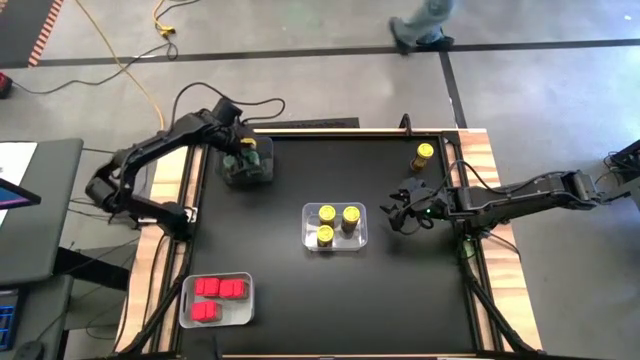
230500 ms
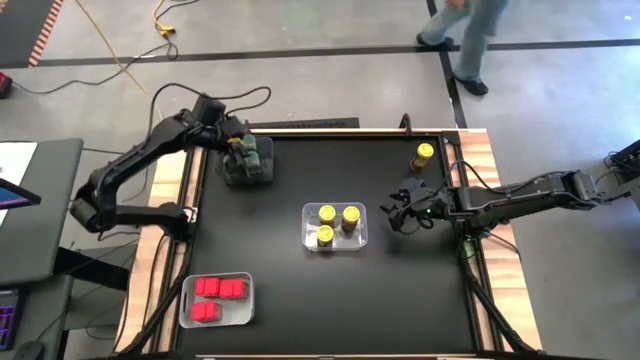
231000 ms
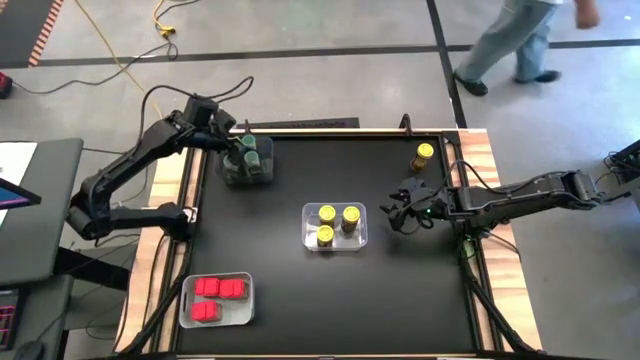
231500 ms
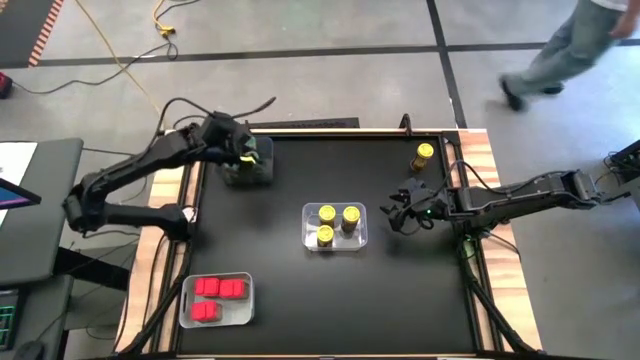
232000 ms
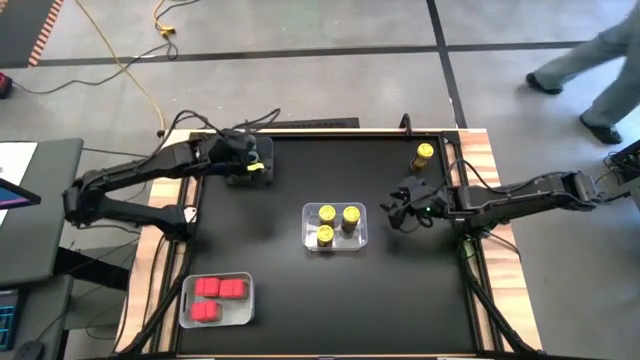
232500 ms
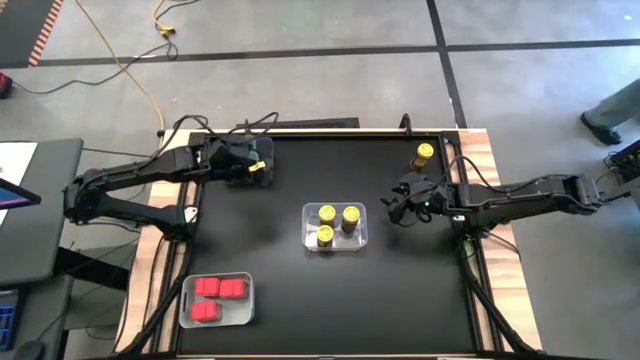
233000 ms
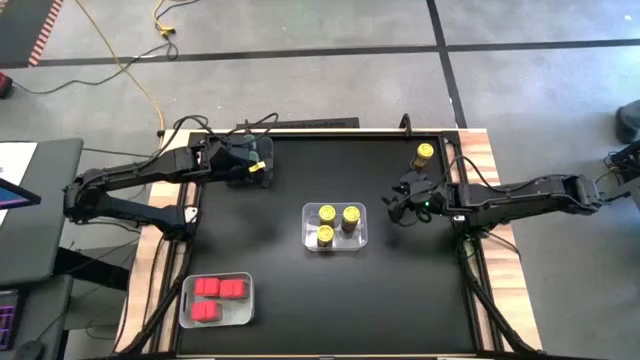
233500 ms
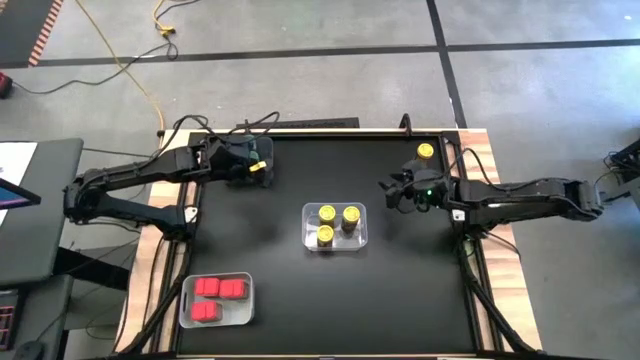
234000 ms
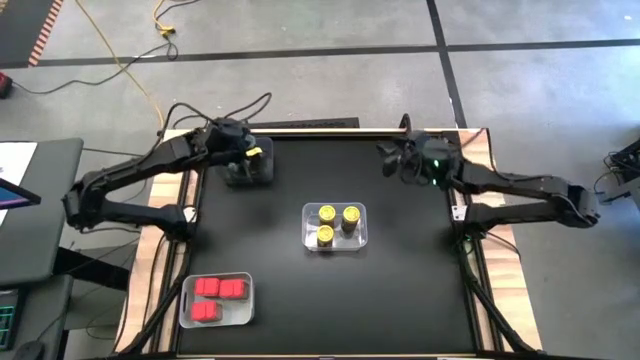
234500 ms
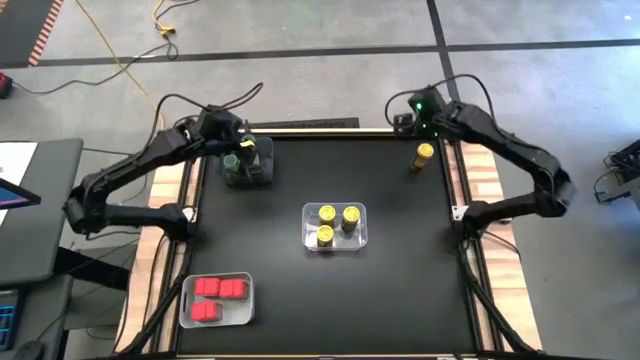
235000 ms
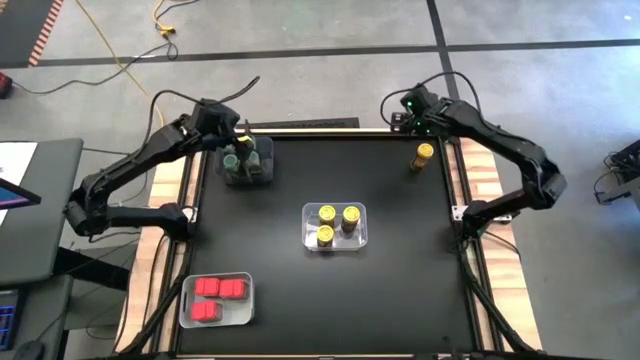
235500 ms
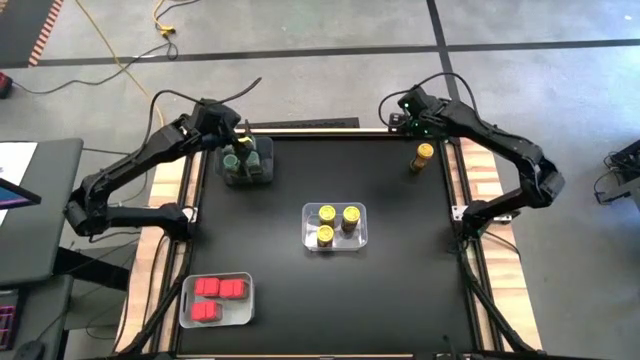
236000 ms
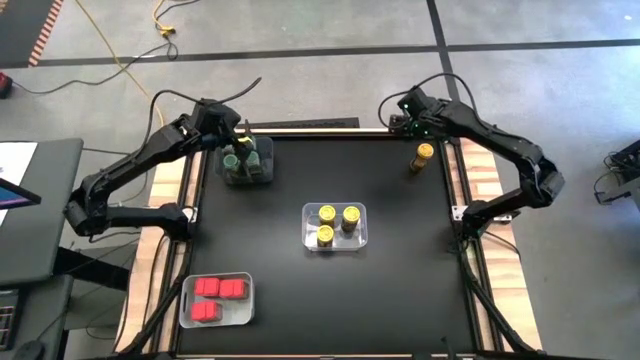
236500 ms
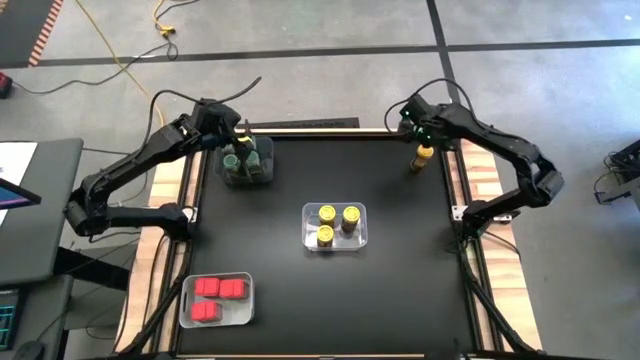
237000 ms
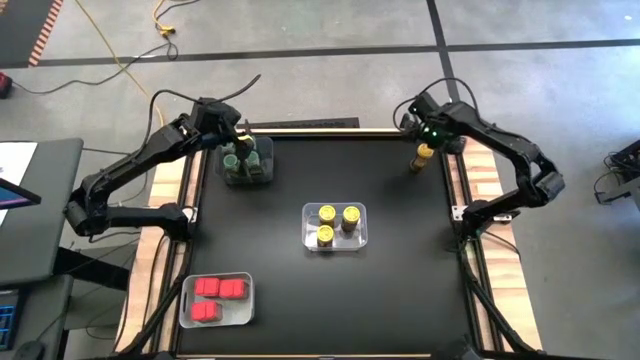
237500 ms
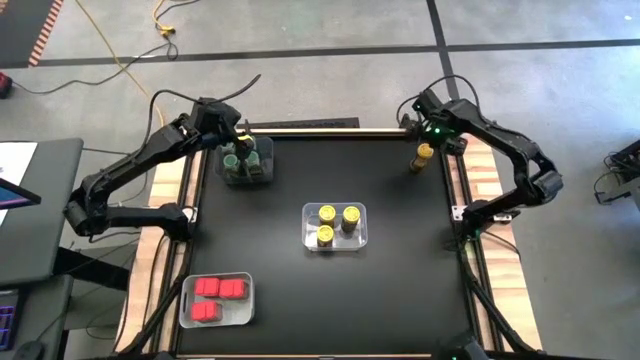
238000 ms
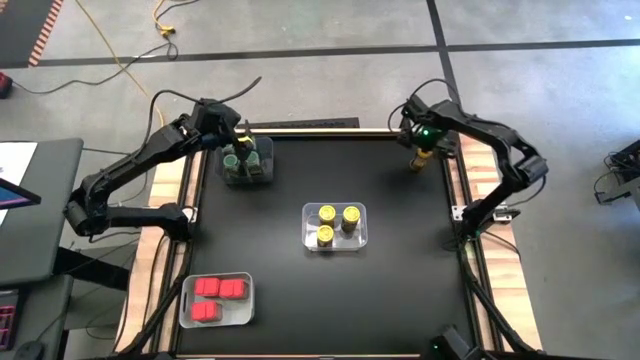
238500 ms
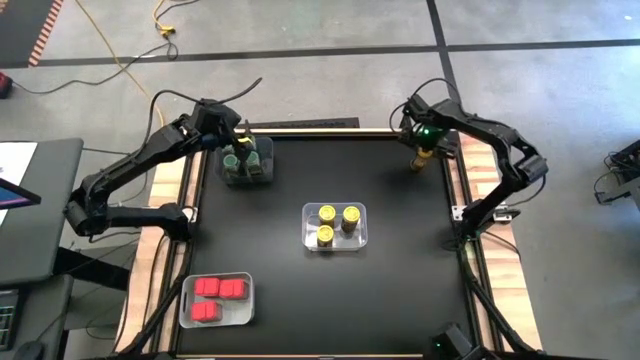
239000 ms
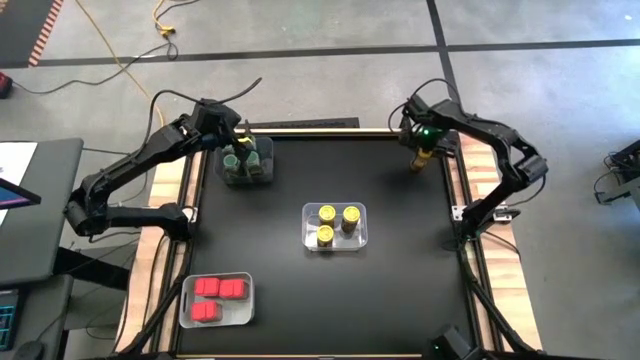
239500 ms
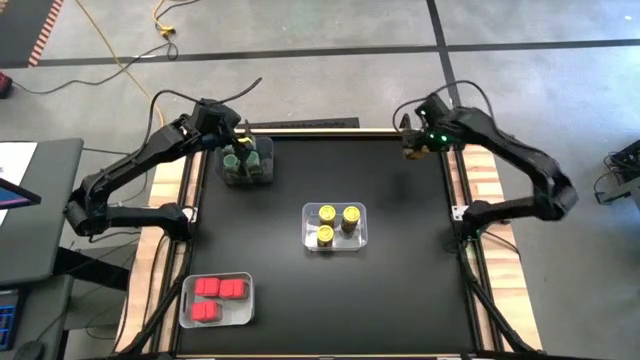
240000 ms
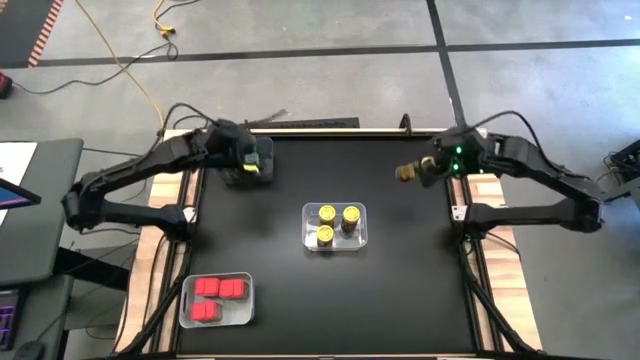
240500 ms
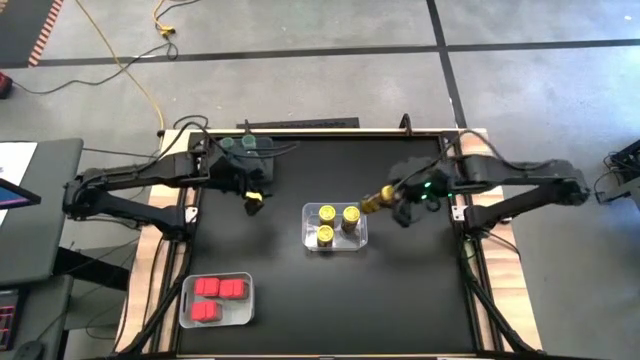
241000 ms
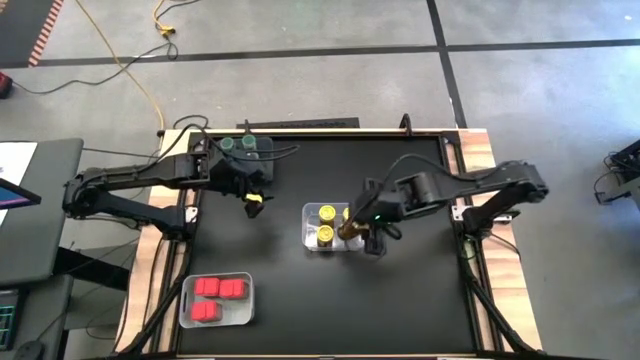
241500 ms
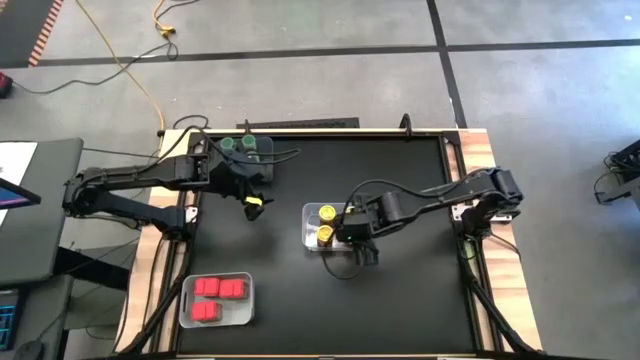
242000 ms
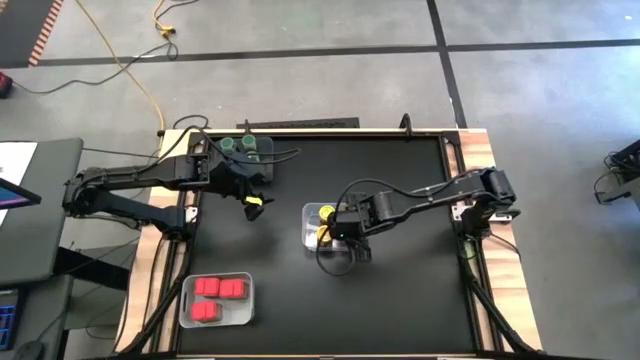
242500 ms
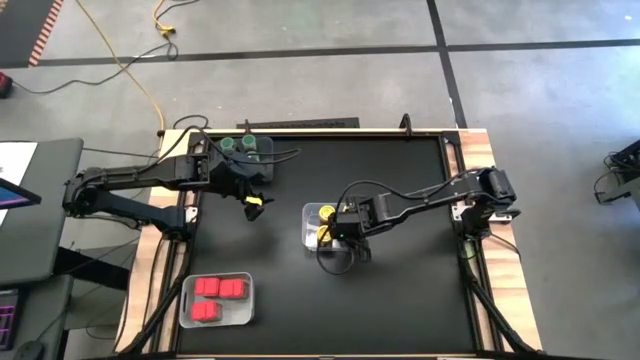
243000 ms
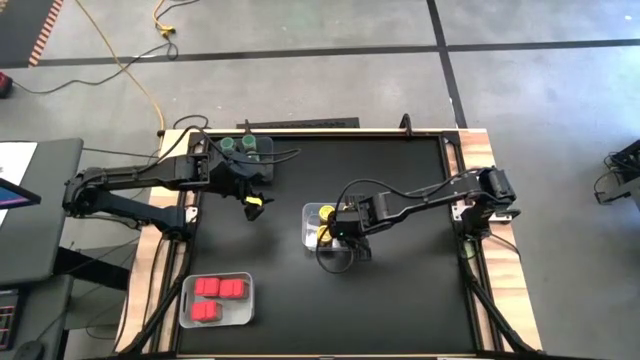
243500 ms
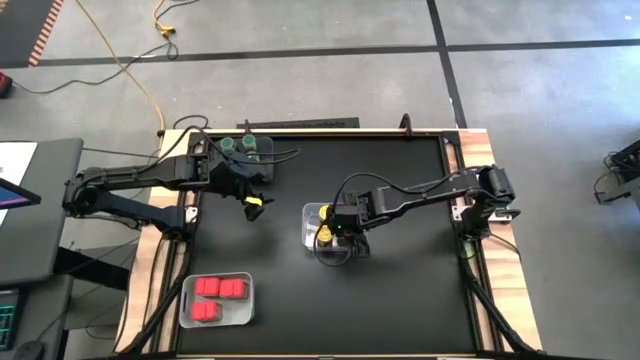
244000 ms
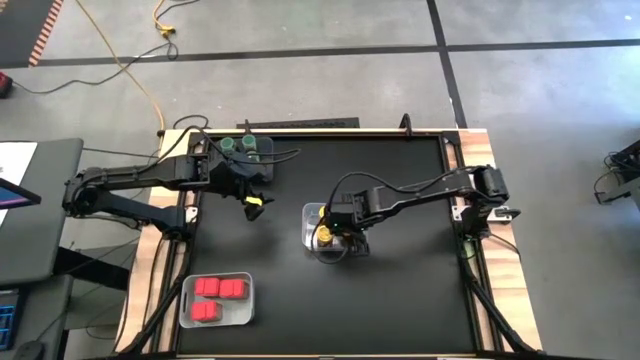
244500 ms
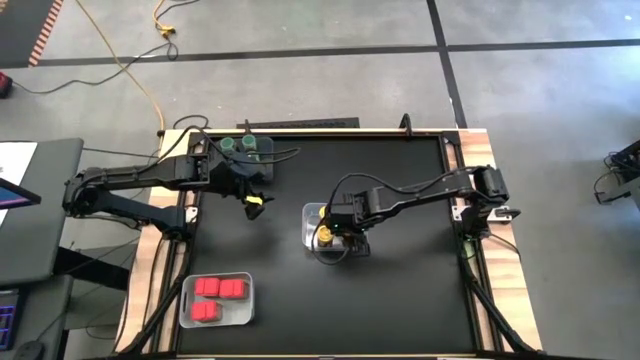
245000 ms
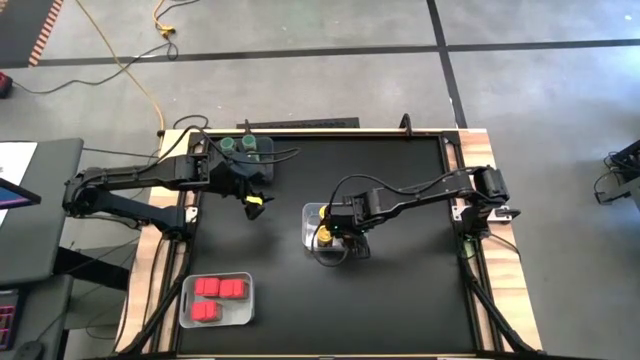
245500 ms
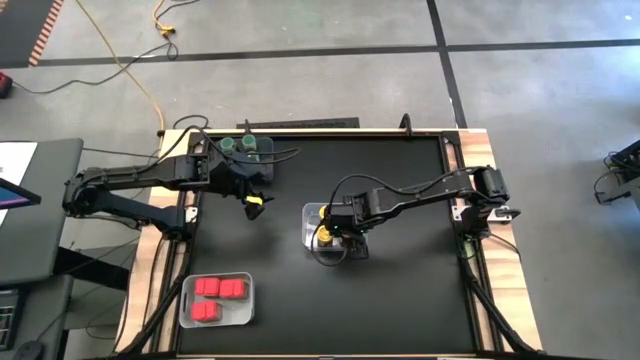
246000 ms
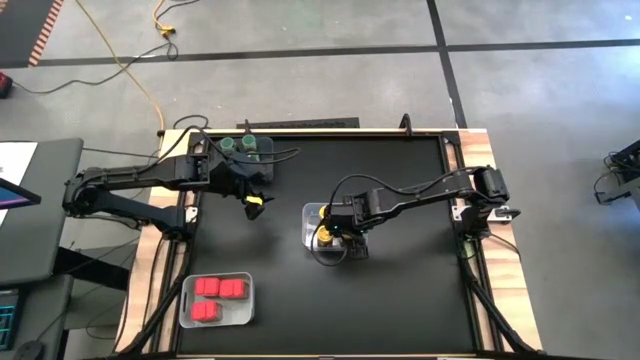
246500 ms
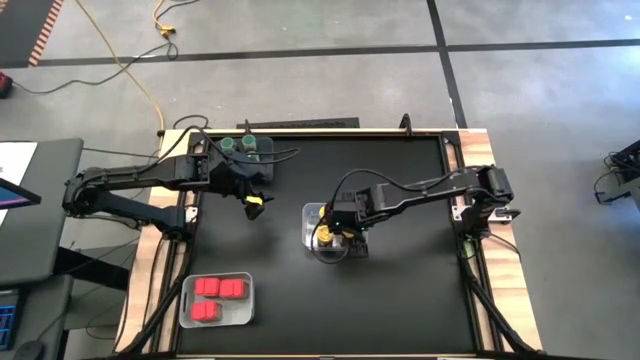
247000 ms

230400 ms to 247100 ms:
Task: Sort spices by type
Put the yellow seasoning bottle into the transparent bin

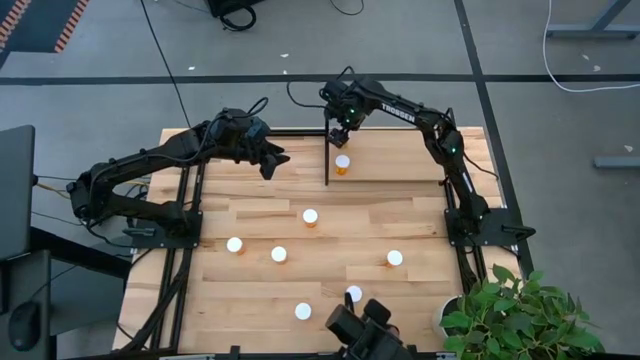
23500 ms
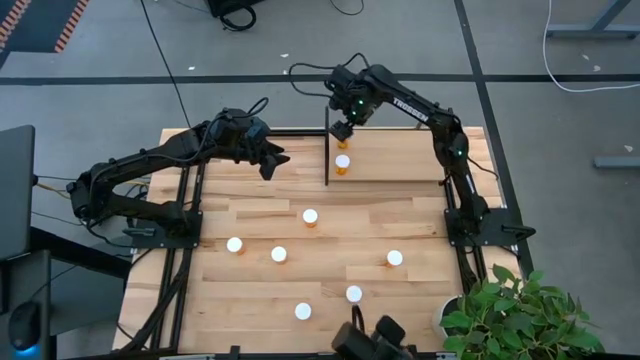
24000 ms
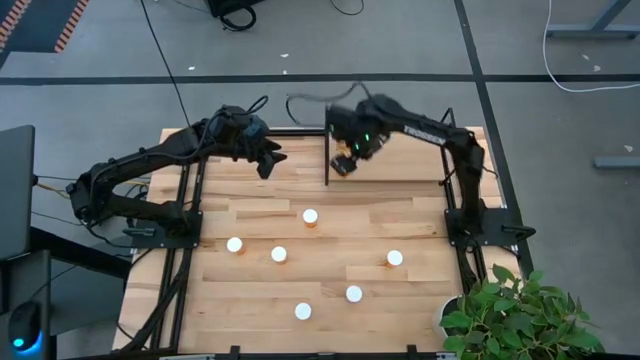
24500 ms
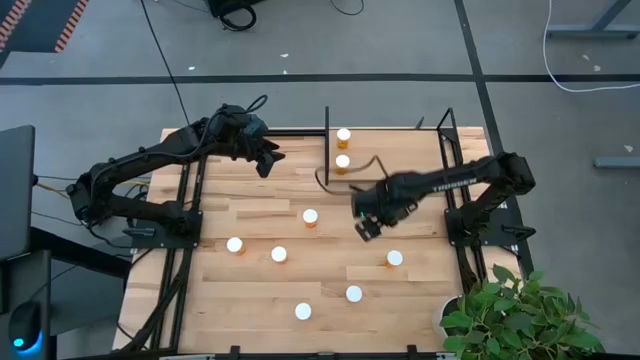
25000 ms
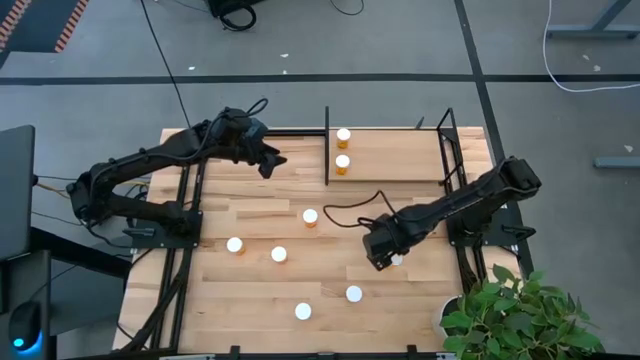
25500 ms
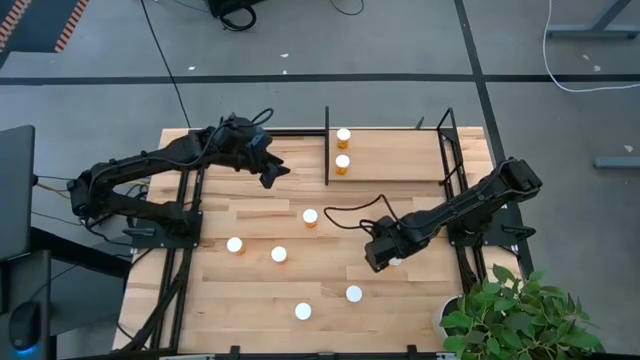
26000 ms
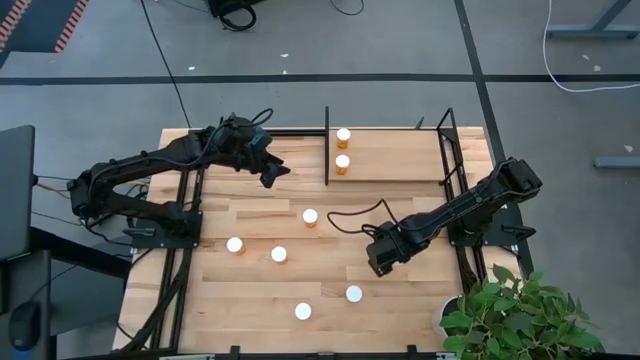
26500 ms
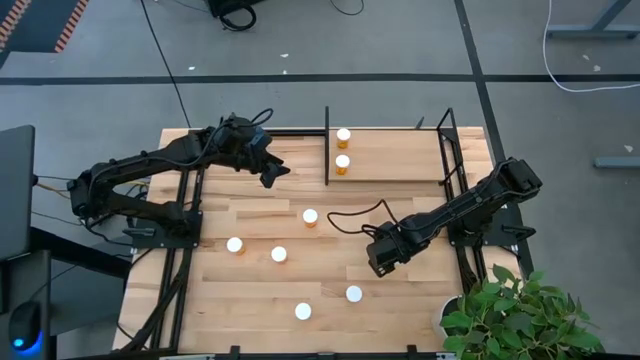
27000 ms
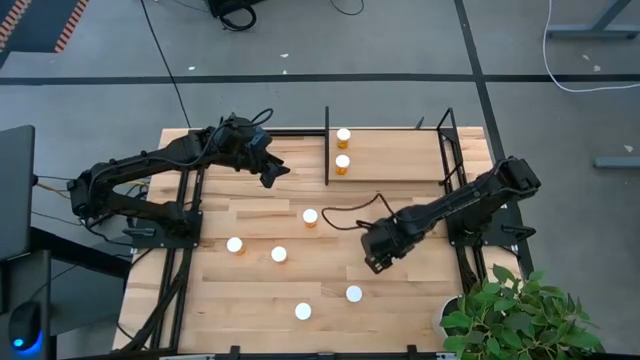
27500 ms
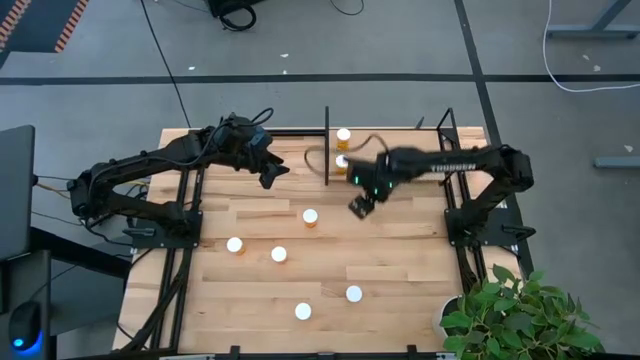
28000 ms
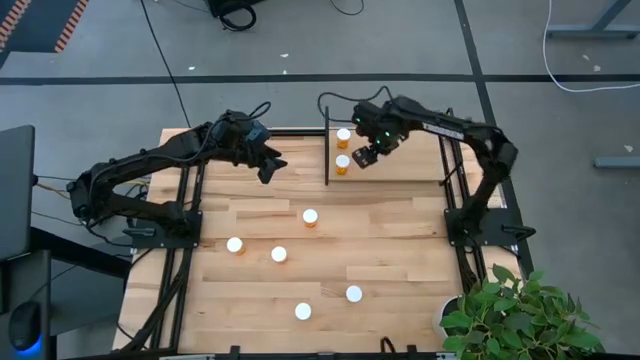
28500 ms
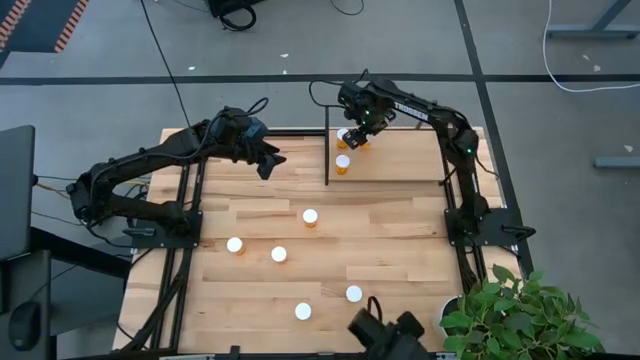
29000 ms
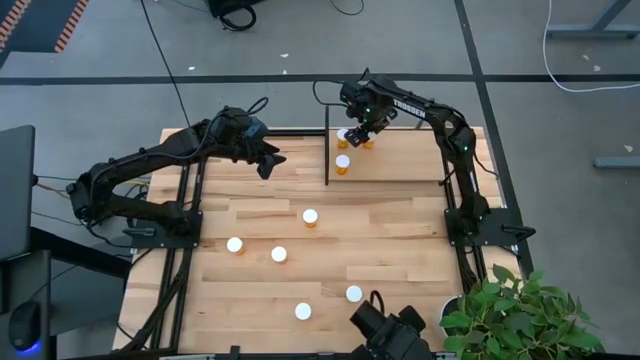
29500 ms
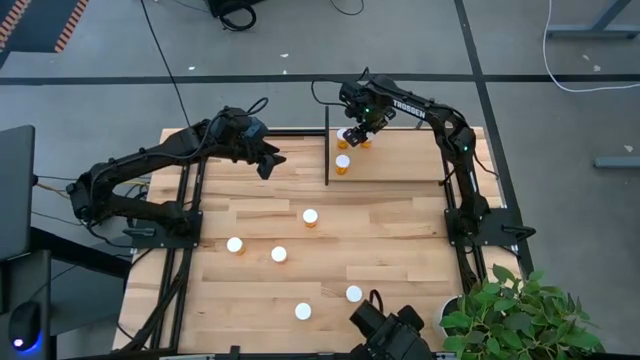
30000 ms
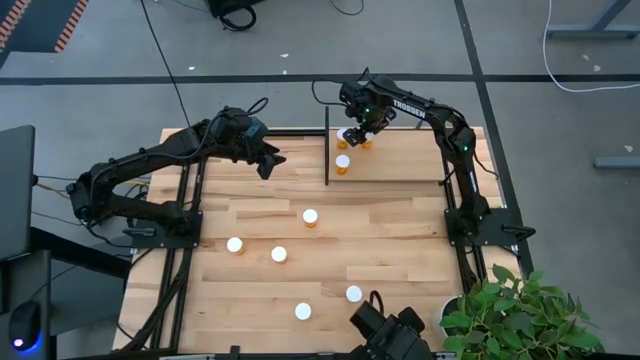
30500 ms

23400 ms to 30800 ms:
Task: Pick and place medicine bottles onto shelf by color
Put the orange pill bottle on the shelf
